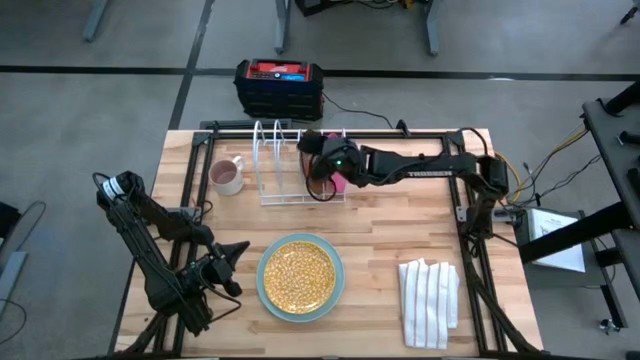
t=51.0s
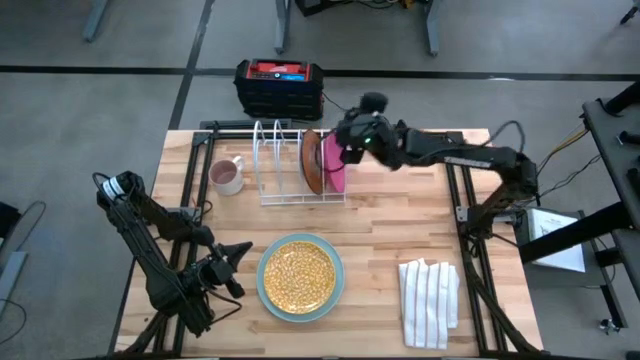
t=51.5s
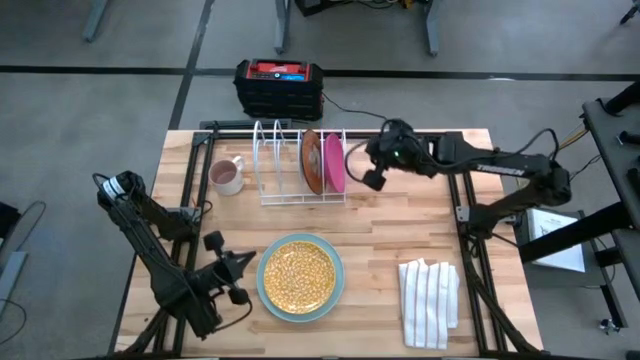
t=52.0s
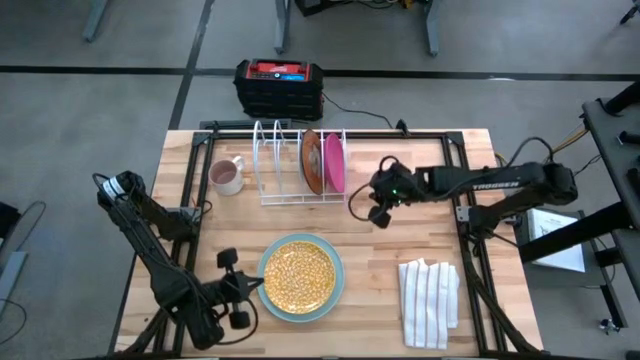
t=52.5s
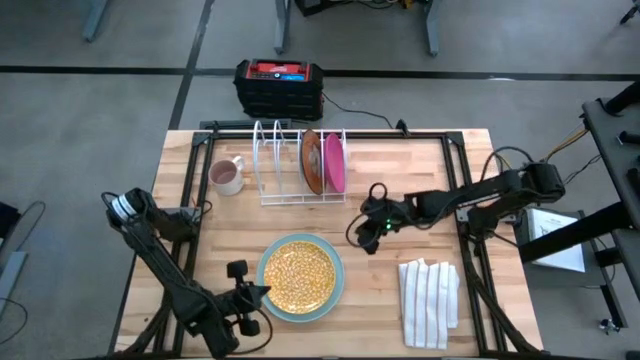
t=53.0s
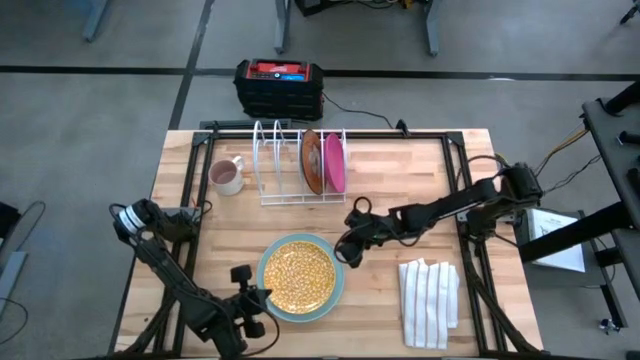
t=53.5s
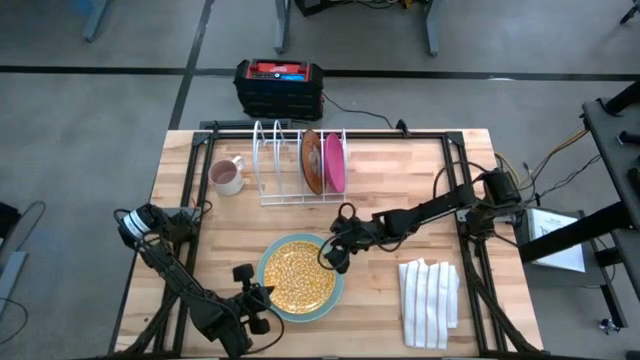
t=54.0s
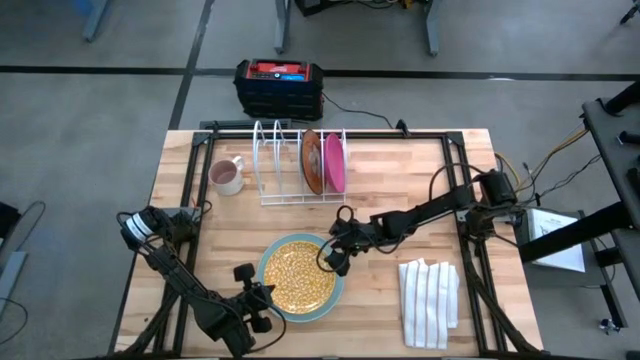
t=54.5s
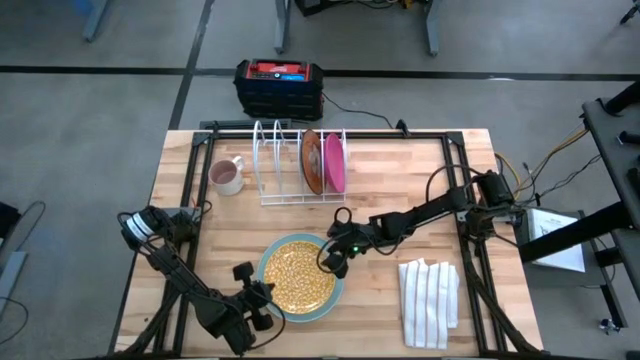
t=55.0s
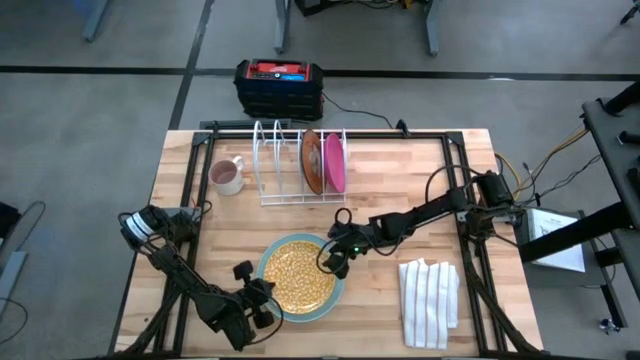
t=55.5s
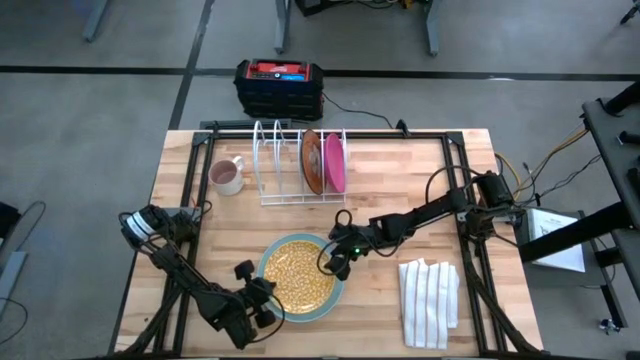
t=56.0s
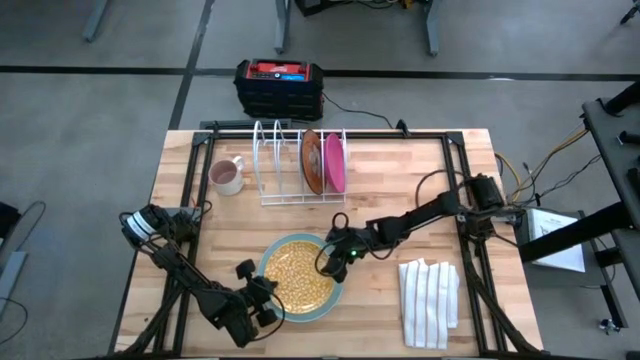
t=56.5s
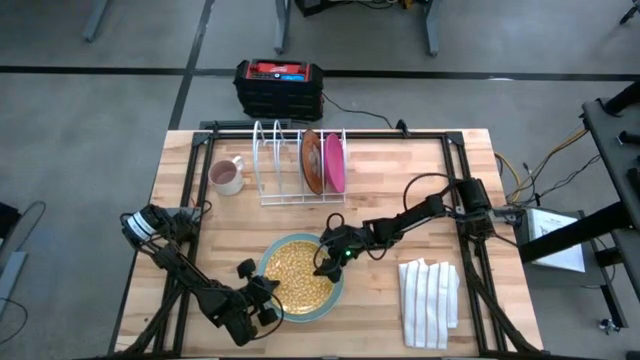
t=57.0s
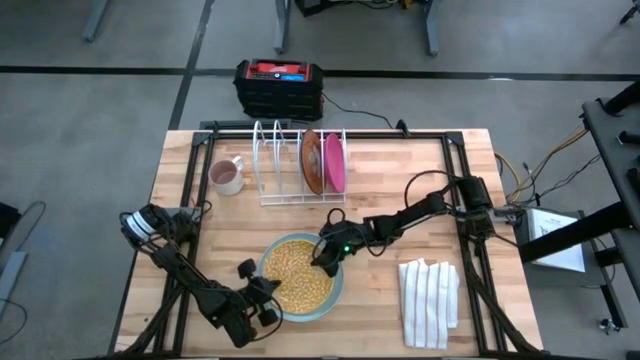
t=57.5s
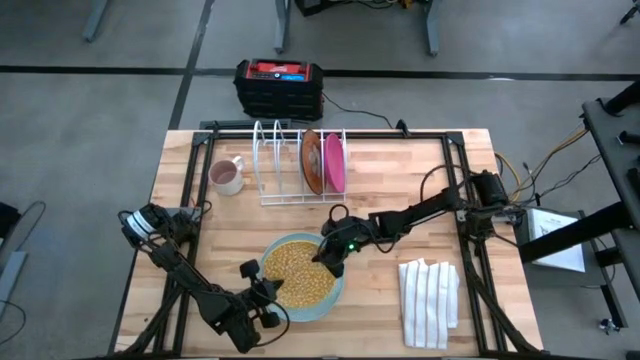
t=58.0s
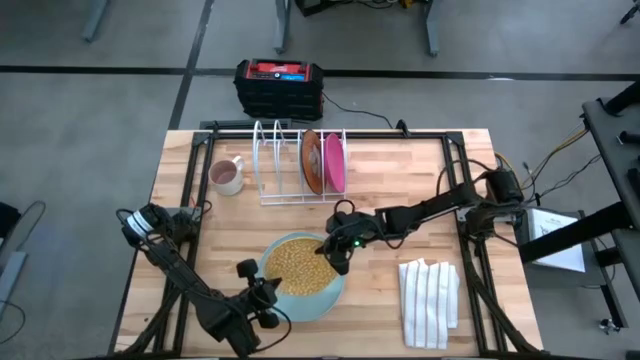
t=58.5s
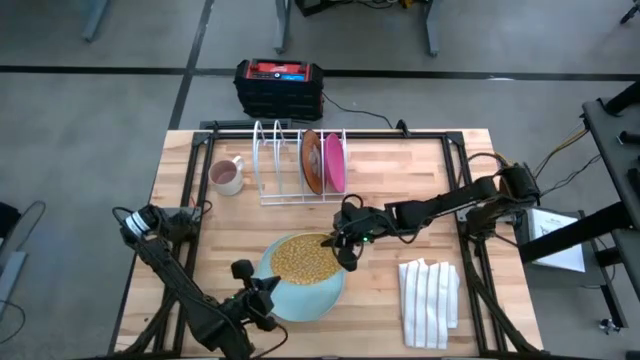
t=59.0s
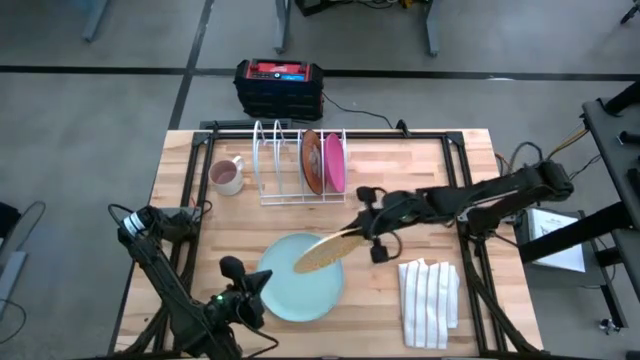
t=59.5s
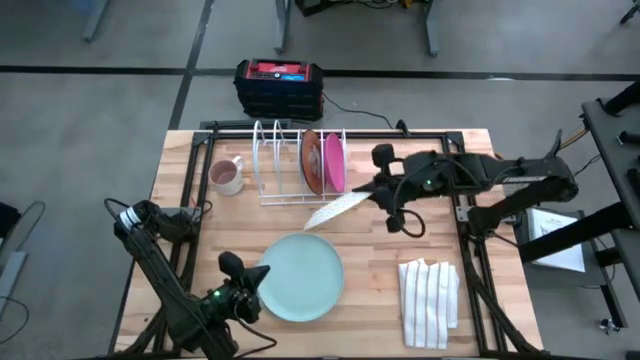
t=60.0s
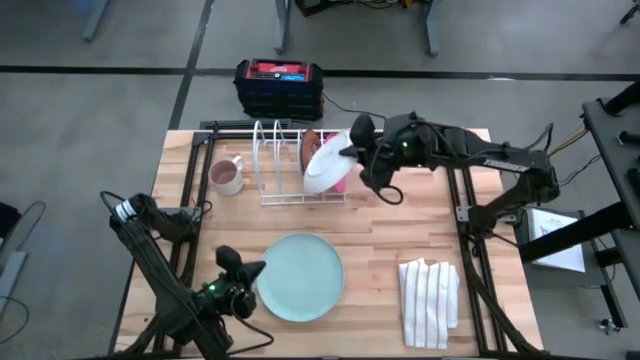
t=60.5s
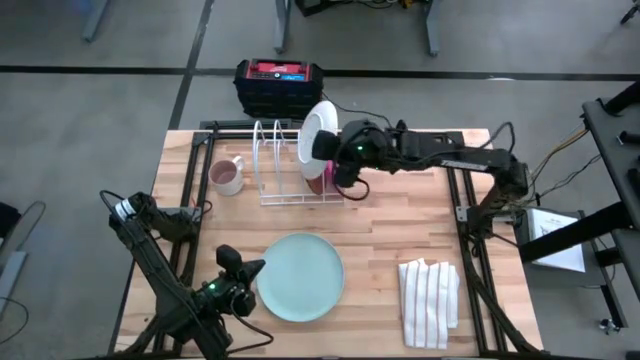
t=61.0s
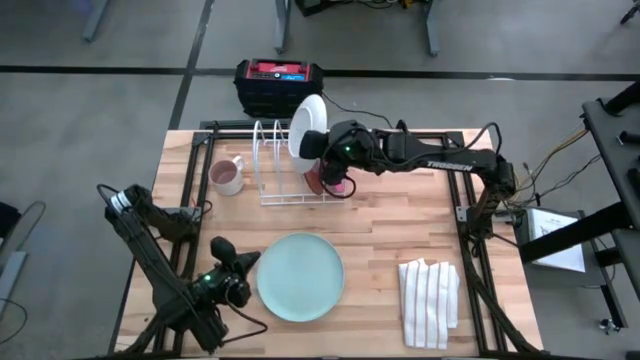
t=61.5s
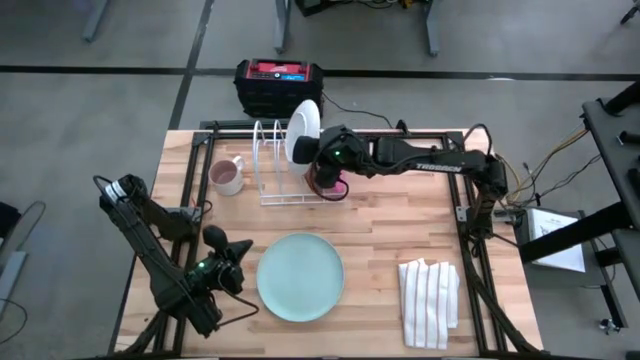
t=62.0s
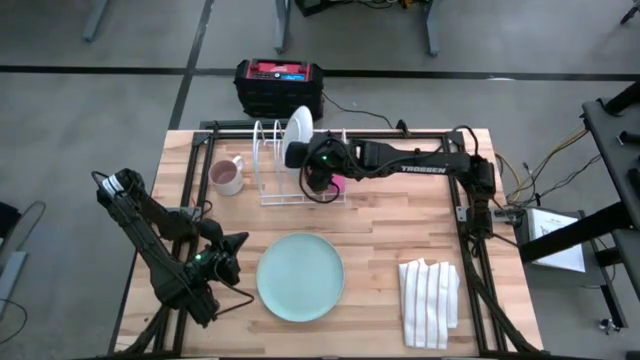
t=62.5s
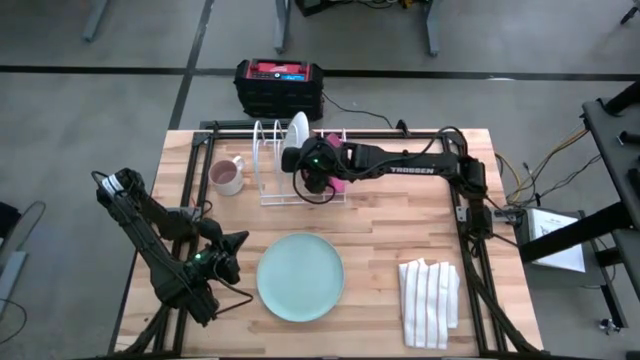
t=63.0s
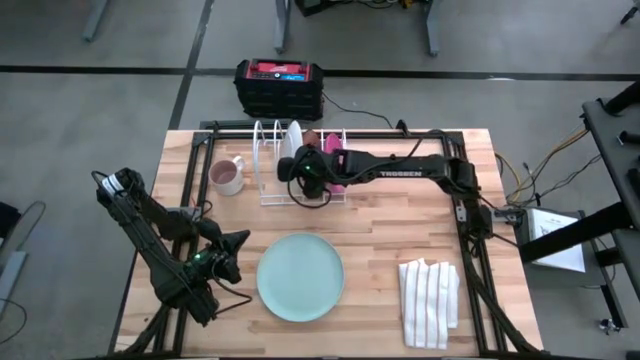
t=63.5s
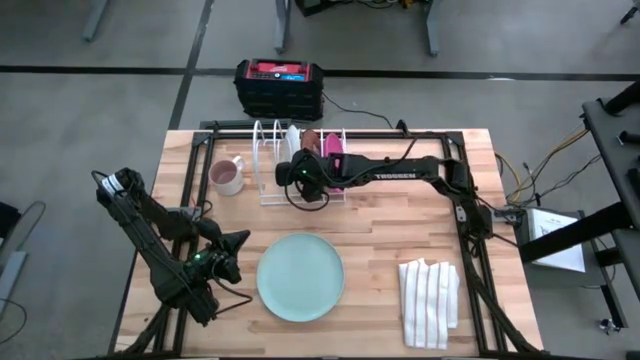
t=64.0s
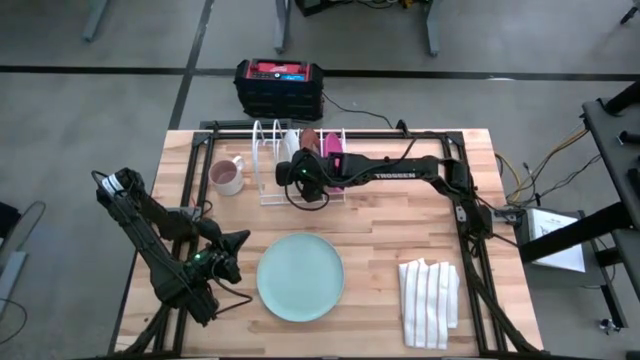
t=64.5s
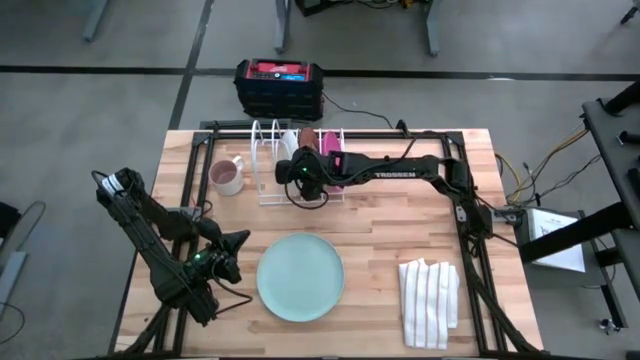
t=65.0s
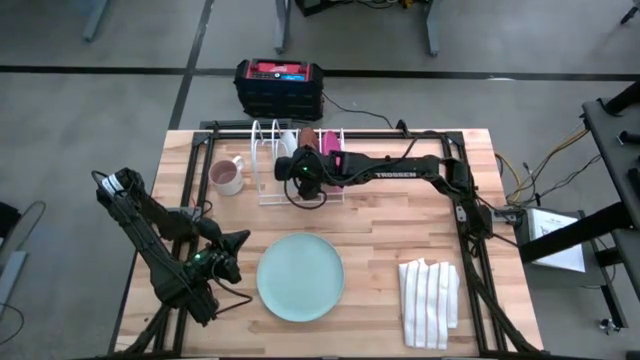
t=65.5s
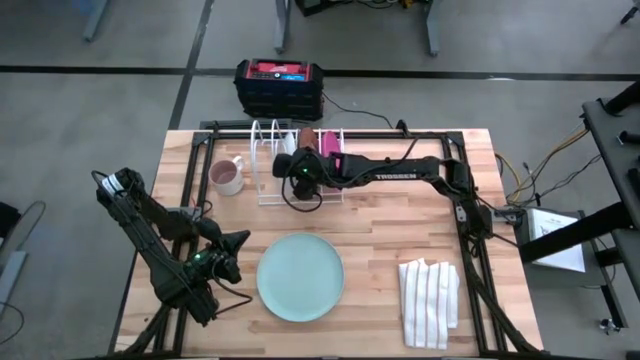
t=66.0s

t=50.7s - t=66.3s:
Task: Sort dishes
Put the yellow patterned plate into the dish rack

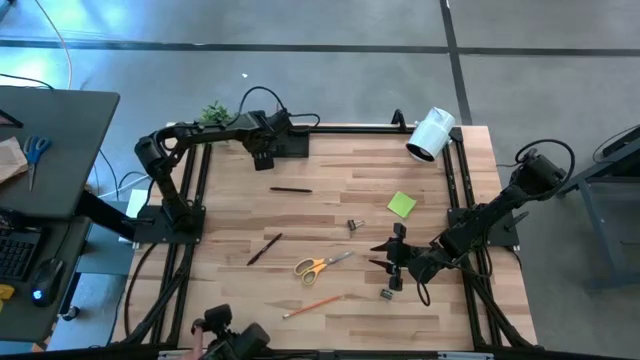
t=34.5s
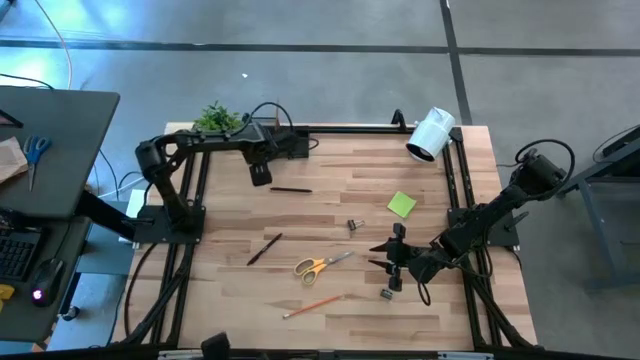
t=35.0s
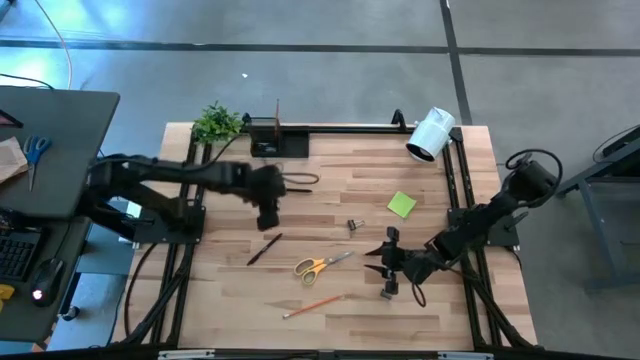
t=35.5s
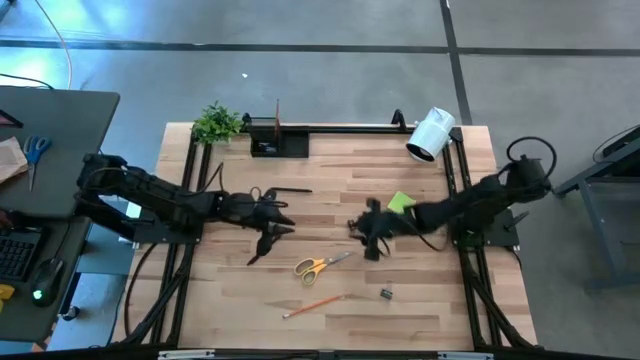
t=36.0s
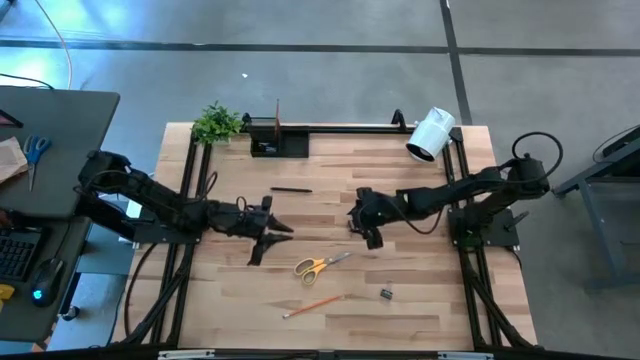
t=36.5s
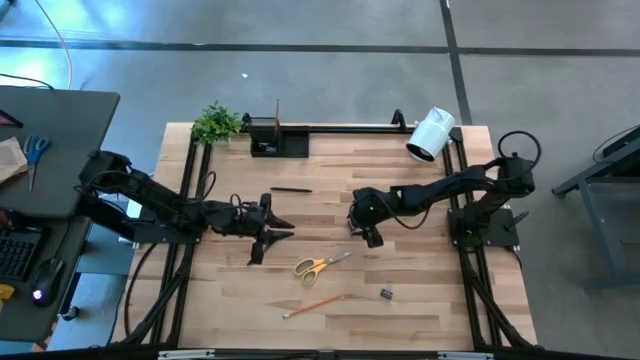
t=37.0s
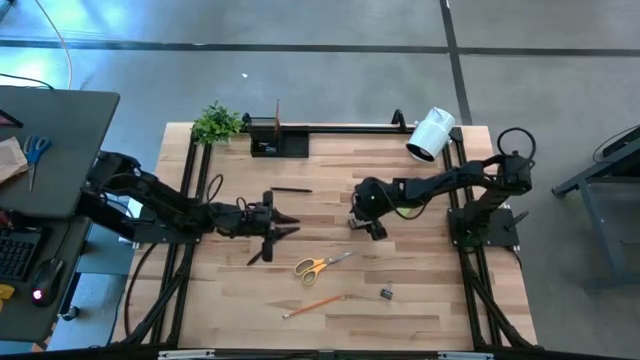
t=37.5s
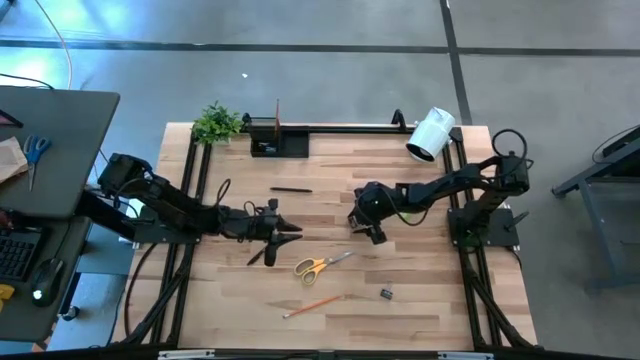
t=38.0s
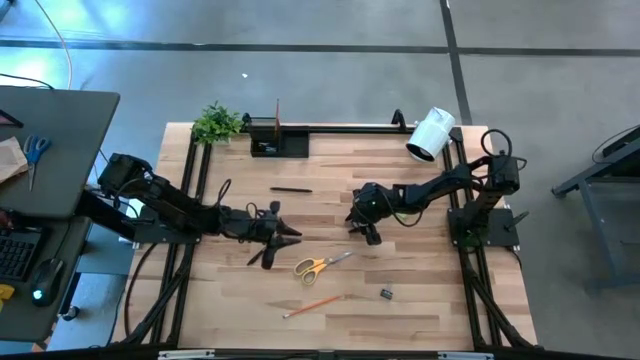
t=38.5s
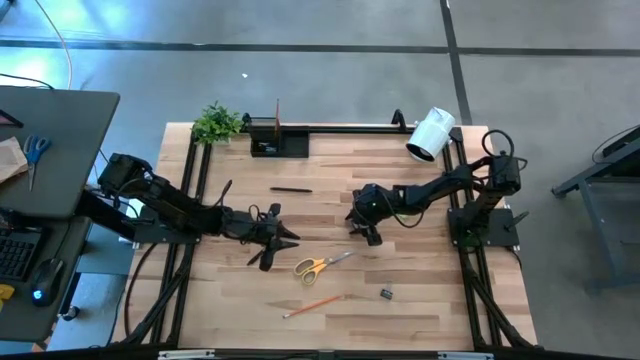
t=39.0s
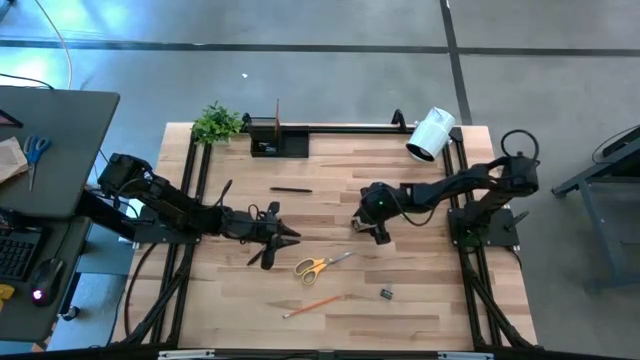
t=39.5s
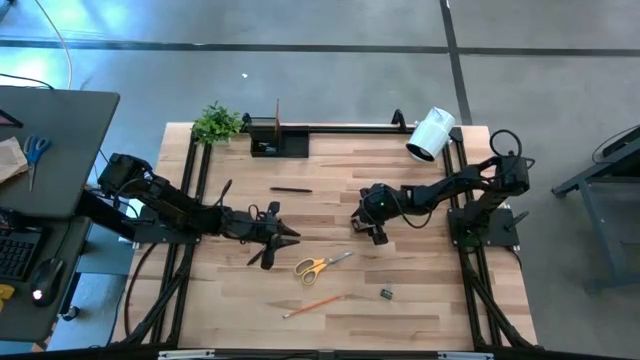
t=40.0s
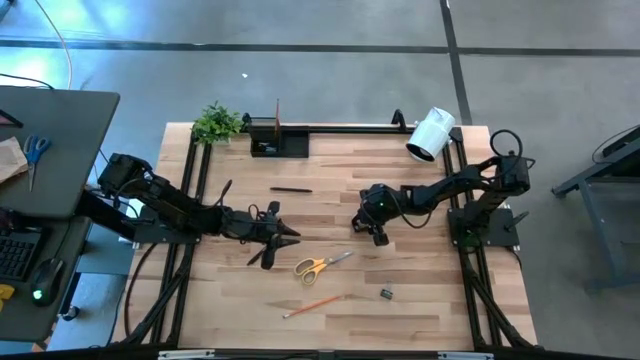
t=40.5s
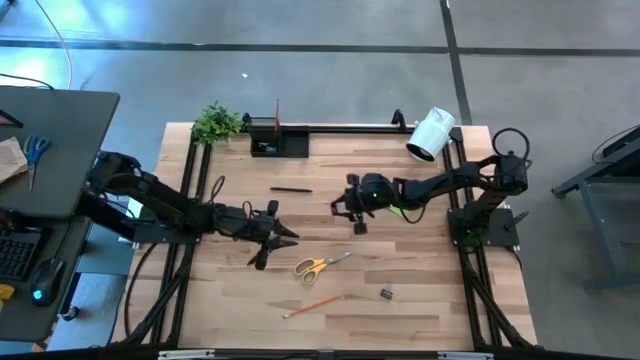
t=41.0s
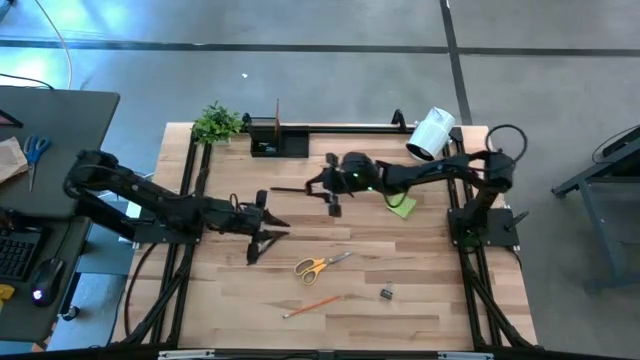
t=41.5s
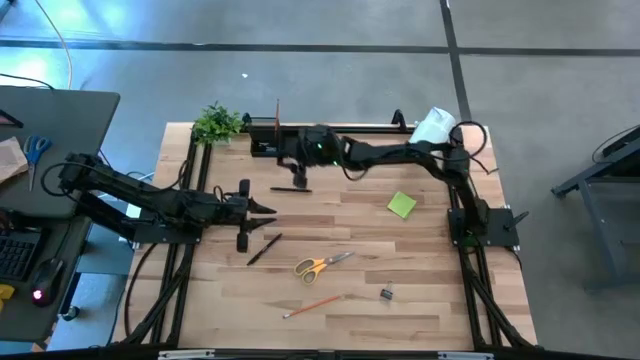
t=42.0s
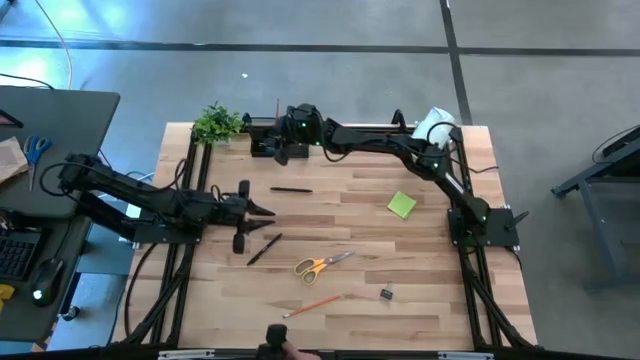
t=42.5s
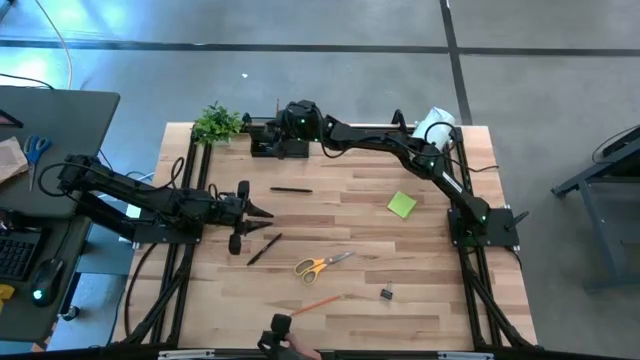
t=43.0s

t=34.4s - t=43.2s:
Task: Pick and place office supplies into organizer
Put the top black binder clip into the bottom left section of the desk organizer
